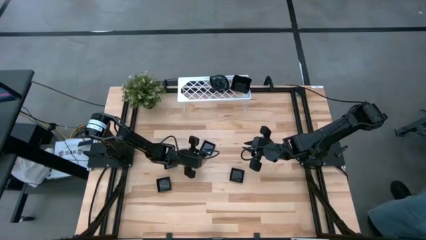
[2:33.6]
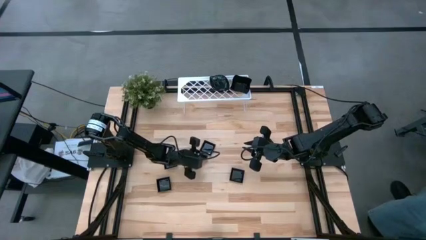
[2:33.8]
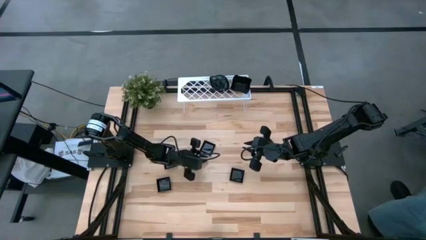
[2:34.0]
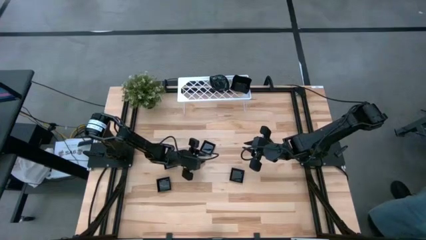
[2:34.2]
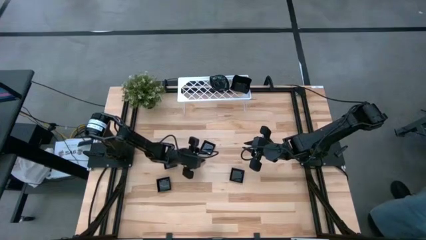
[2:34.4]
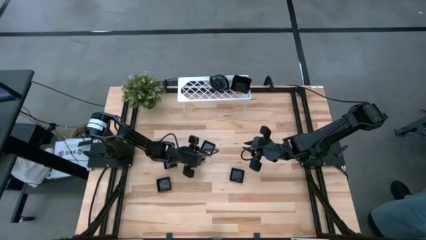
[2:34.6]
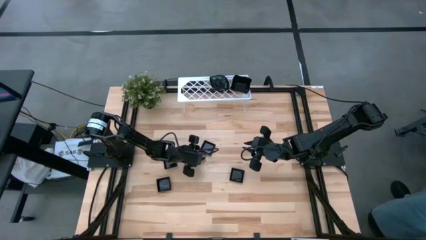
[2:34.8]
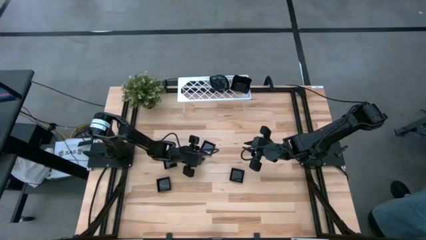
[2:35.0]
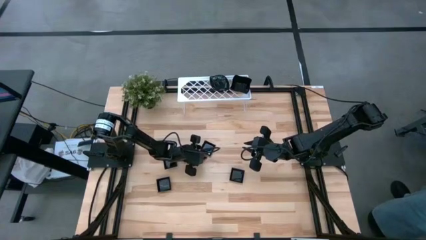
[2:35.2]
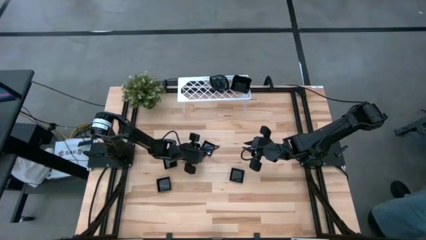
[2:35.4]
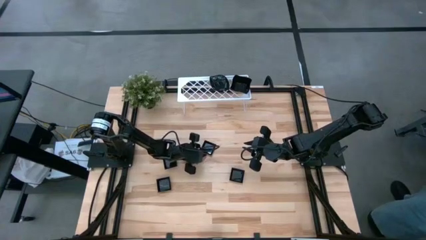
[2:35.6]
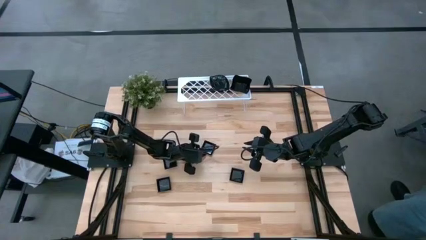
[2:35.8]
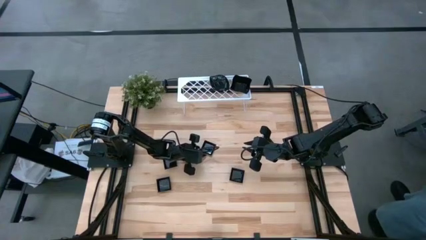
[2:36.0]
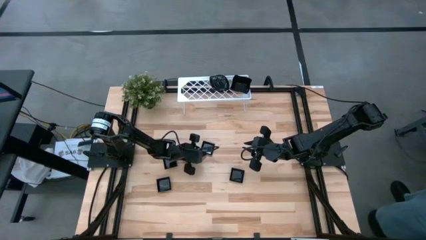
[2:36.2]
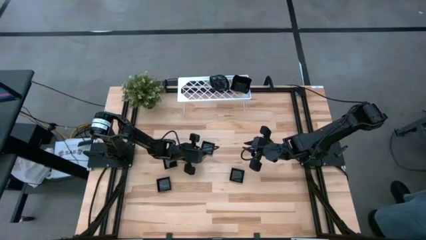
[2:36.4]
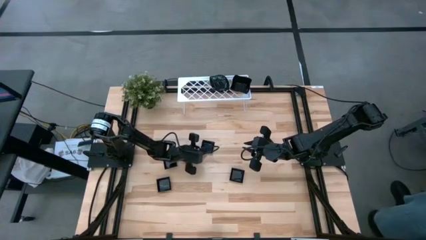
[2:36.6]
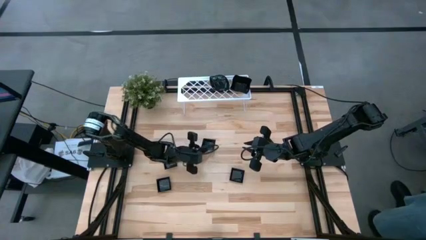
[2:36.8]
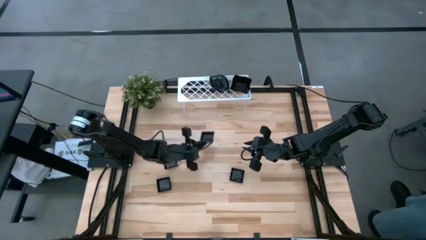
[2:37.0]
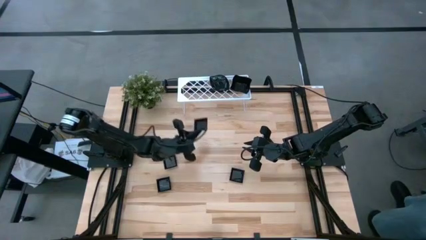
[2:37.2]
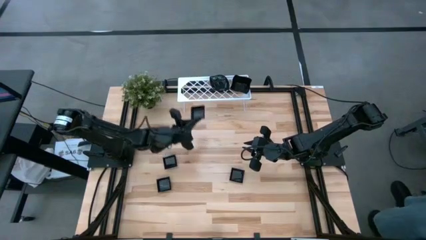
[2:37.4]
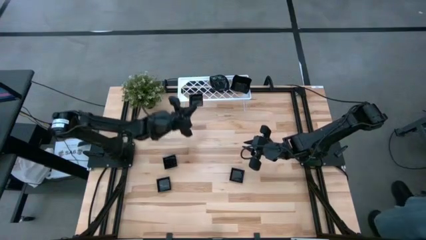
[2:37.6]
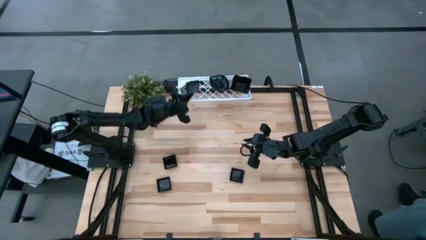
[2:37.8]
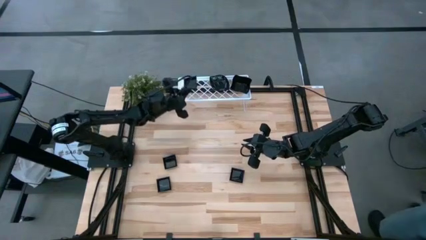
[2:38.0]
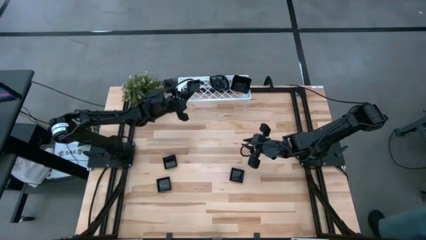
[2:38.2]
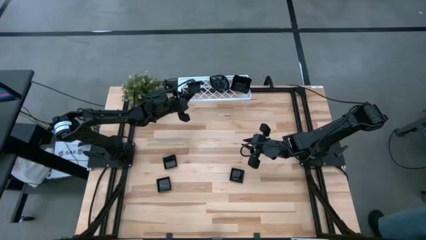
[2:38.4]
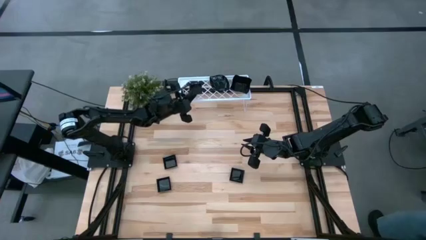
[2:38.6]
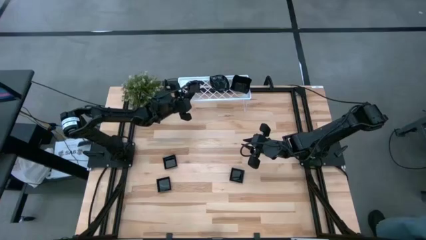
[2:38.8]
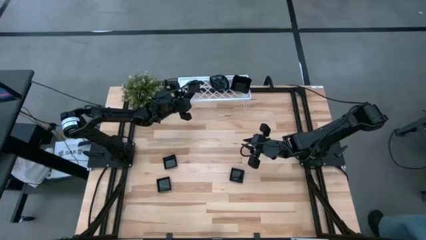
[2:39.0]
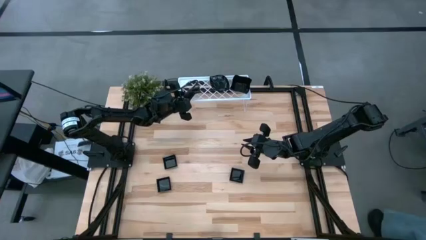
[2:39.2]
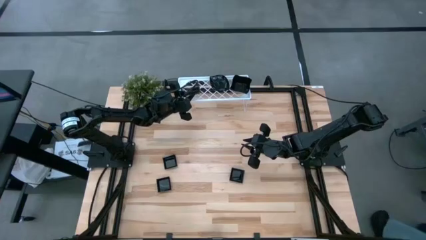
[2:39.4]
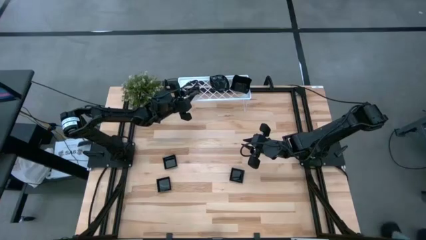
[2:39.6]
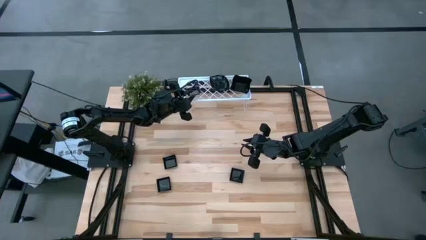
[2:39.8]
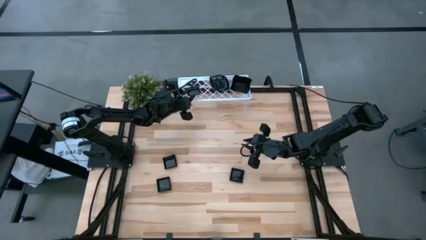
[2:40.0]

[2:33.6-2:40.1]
Task: Pick & Place Mini shaped plates
Put the black square plate on the shelf

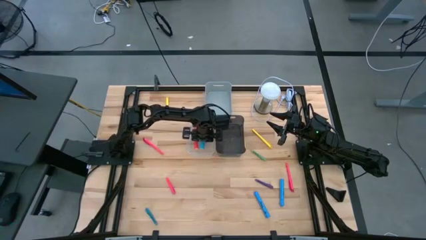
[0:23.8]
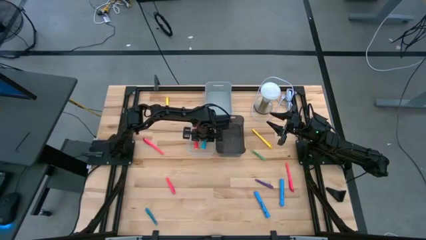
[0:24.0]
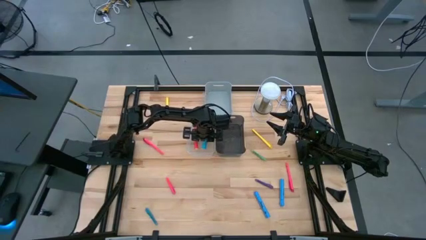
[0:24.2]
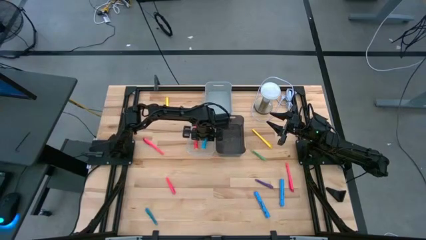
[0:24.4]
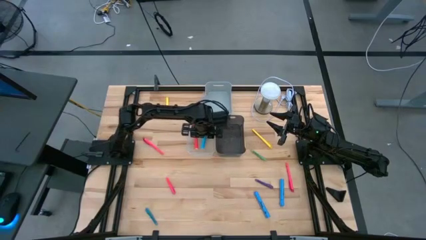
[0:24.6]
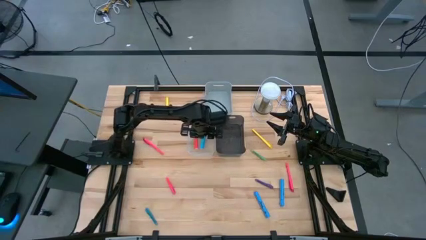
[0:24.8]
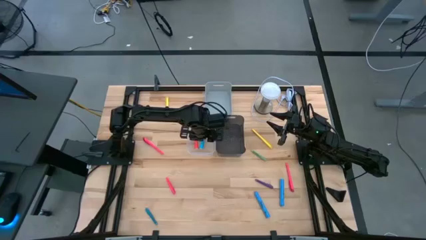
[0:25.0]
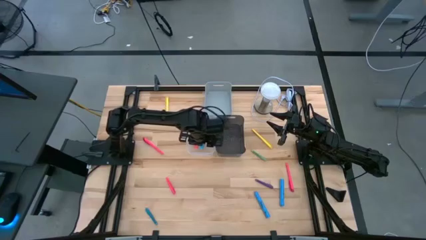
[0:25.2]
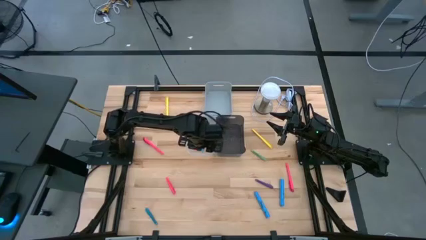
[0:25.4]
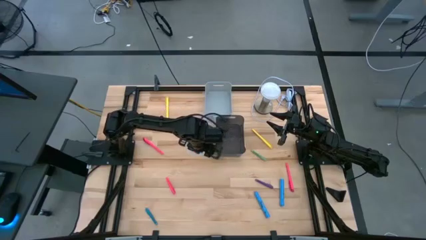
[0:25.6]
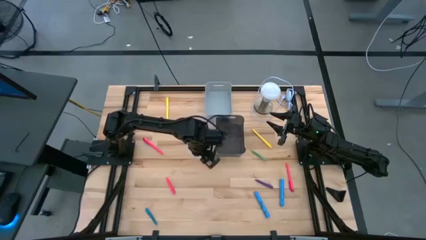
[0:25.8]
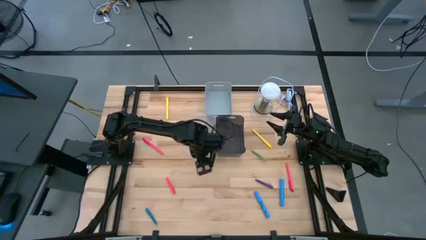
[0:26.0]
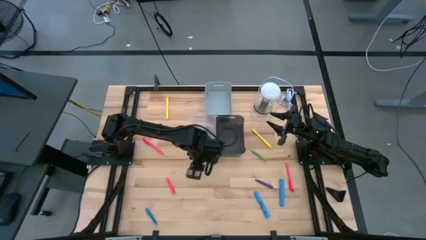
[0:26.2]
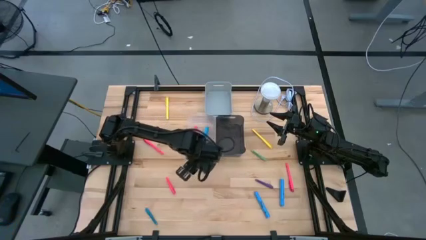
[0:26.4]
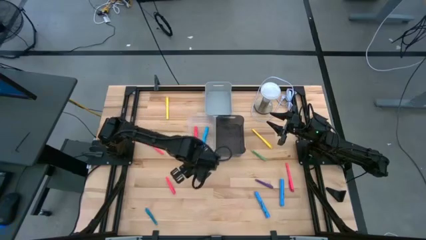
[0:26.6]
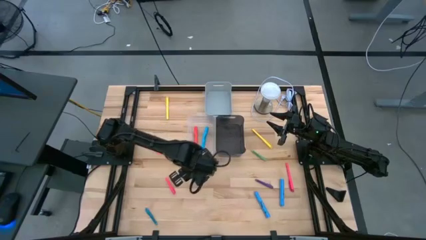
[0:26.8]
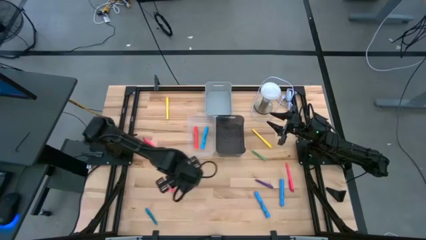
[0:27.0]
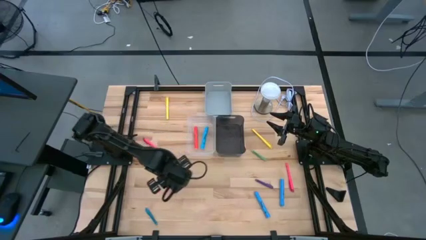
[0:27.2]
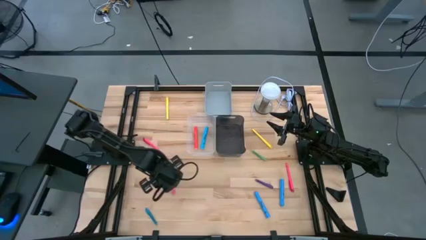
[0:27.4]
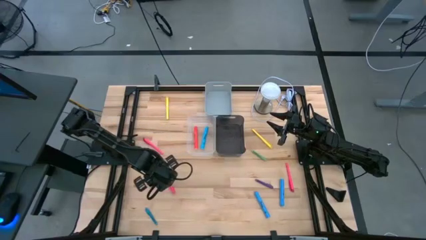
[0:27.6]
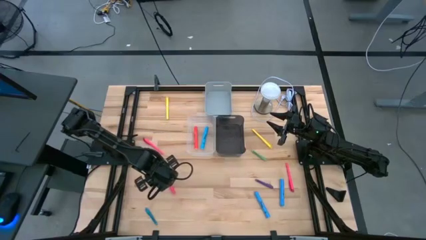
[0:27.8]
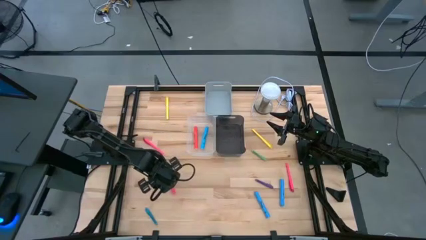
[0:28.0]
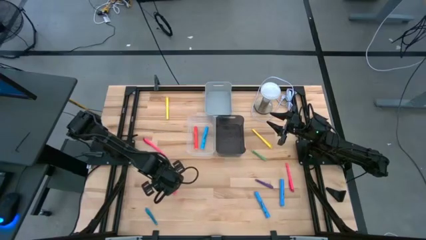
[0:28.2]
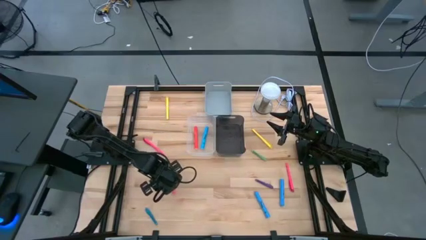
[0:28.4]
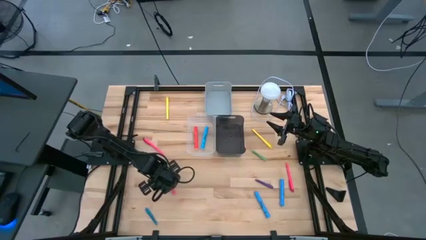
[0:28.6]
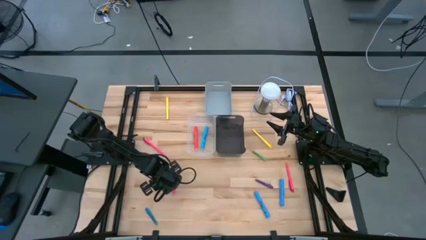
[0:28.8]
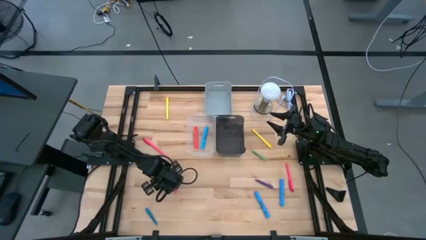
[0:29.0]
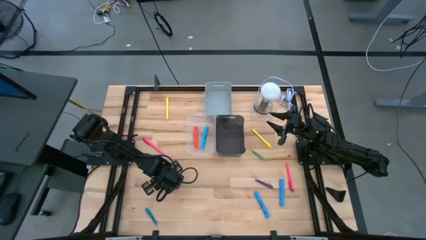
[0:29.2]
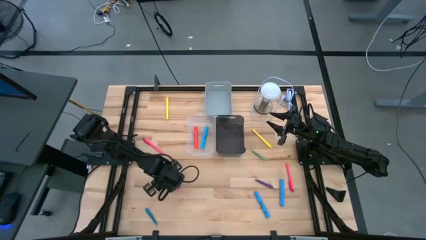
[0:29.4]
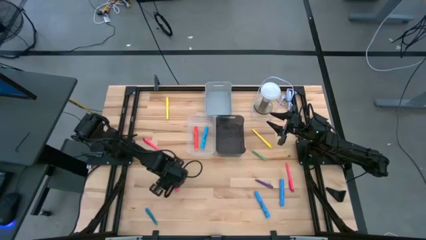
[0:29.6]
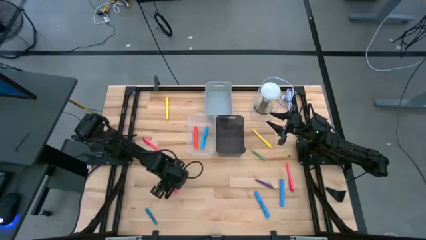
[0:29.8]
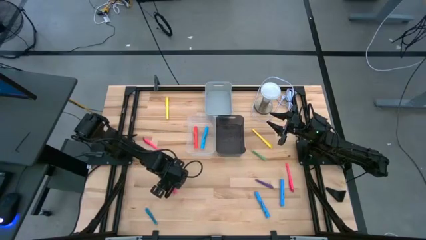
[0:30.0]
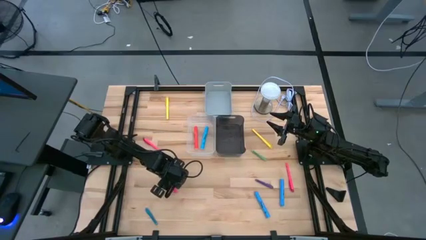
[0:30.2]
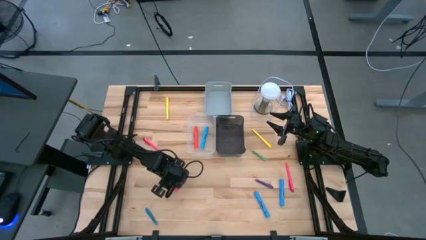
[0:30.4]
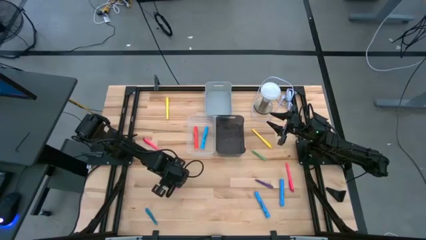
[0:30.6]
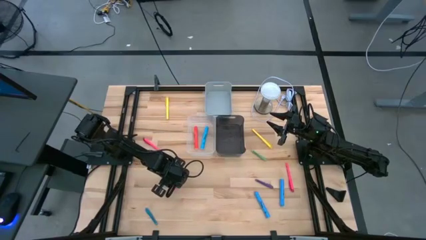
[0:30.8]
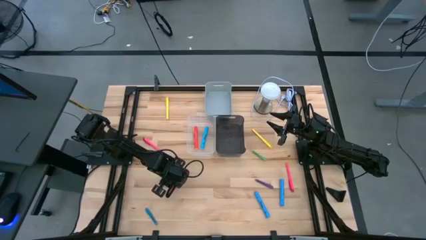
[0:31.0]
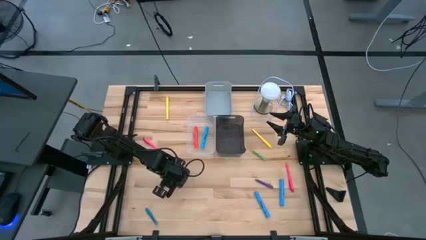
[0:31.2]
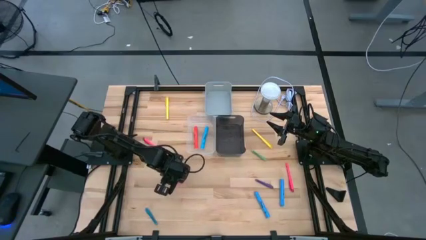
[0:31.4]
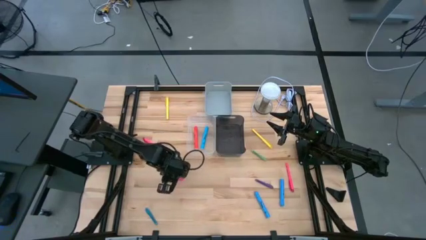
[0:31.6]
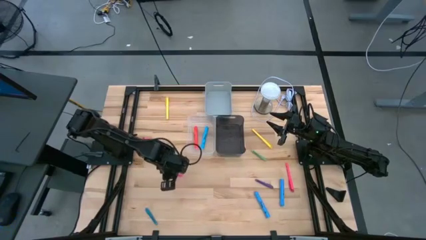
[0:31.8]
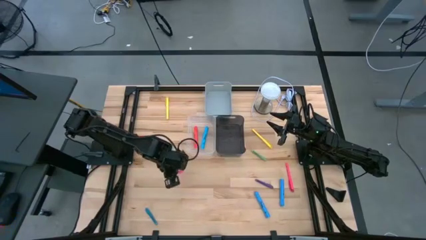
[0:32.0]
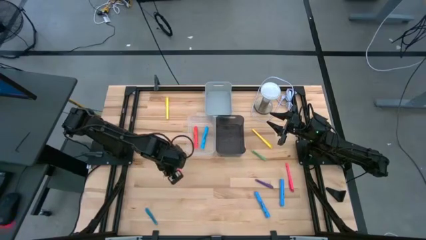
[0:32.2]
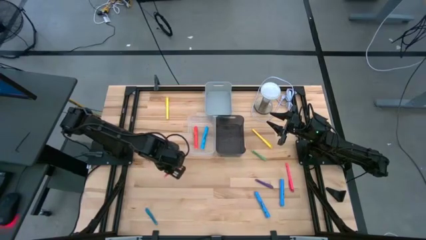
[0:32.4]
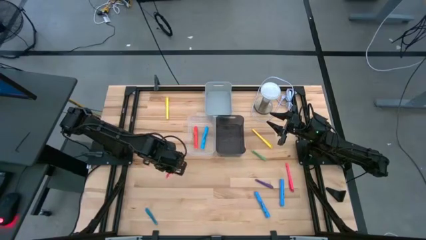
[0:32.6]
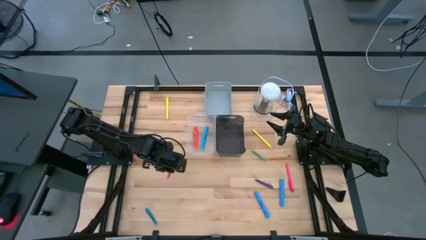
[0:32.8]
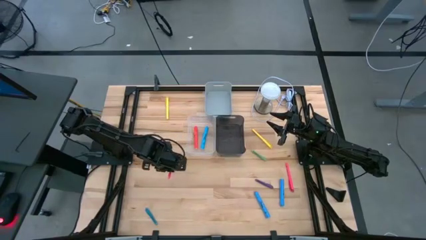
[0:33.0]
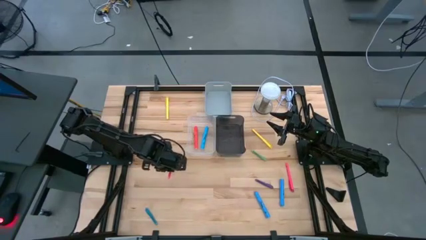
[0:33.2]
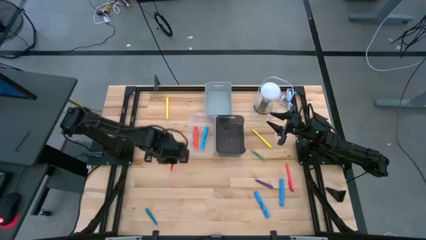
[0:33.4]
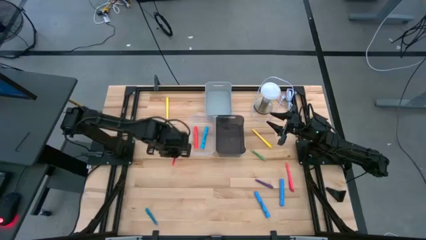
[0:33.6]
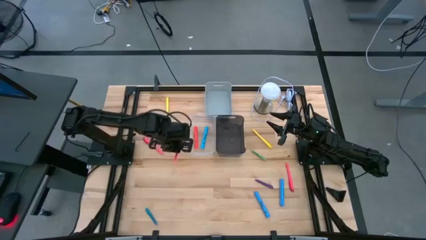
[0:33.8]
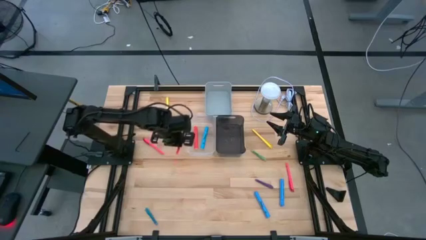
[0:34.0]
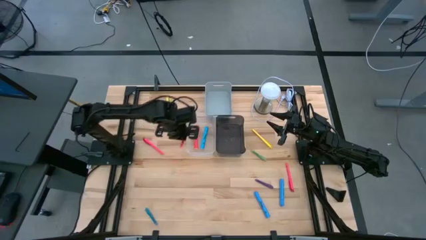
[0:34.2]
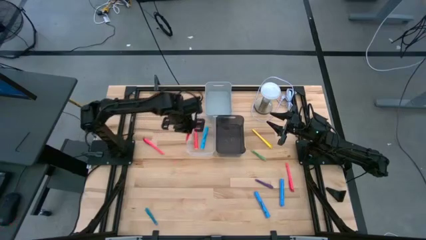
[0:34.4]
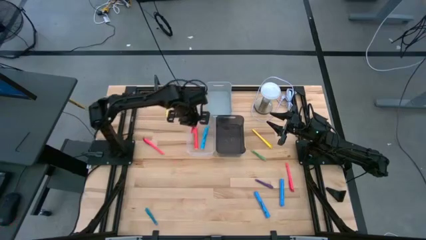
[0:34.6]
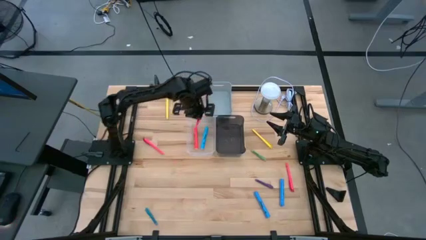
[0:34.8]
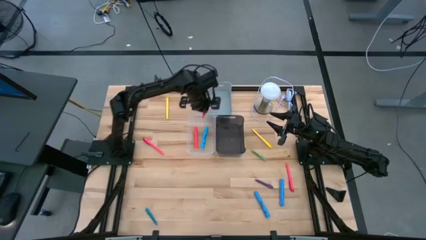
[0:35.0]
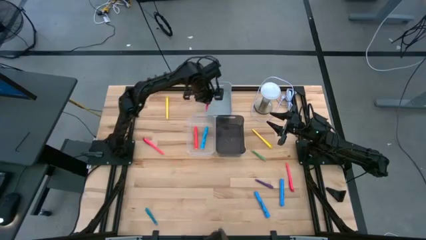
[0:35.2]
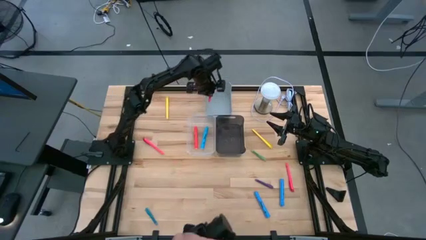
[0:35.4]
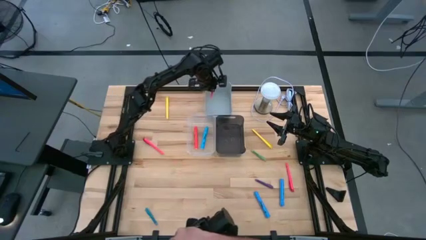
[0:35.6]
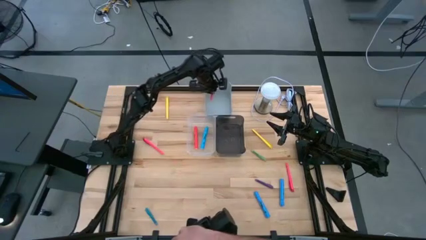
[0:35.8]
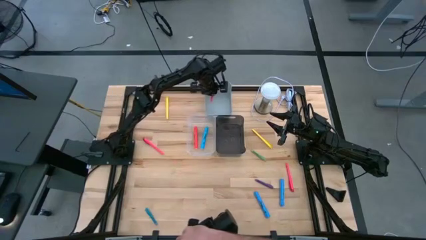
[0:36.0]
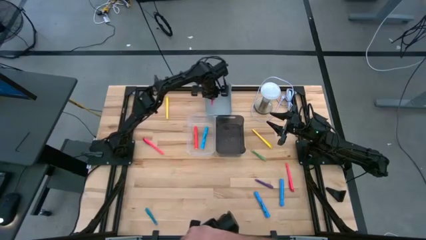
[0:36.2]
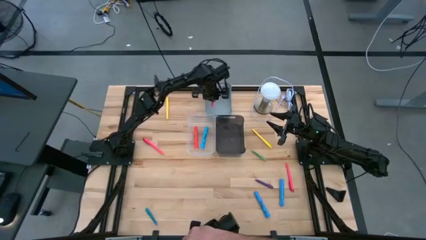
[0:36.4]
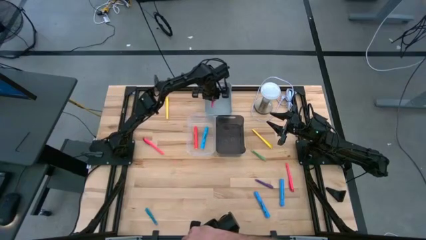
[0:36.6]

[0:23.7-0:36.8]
Task: Pick & Place Markers
Put the pink pen into the gray bin
